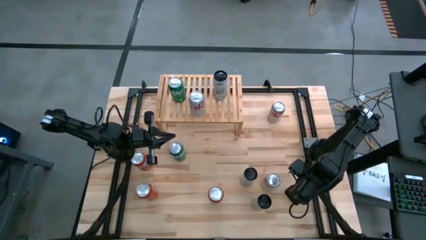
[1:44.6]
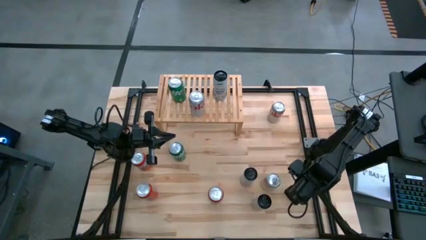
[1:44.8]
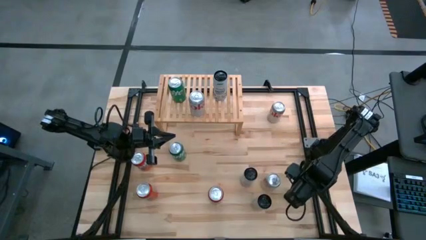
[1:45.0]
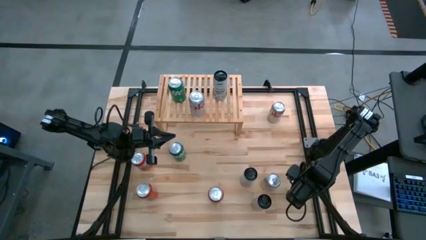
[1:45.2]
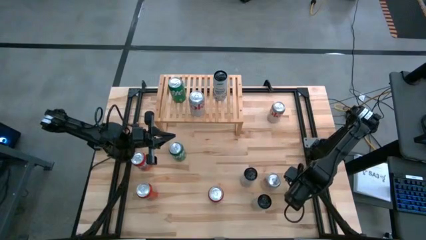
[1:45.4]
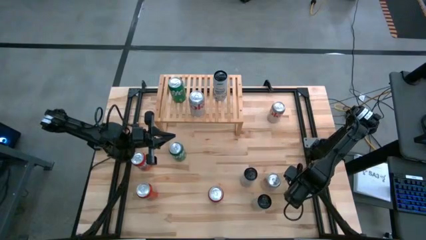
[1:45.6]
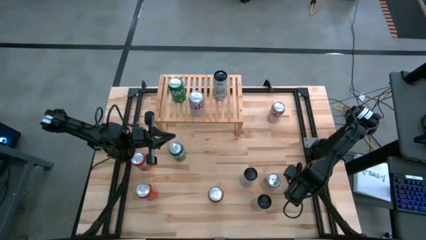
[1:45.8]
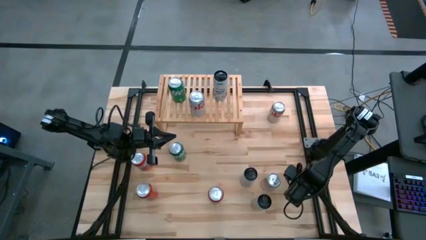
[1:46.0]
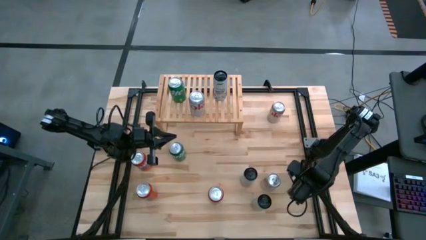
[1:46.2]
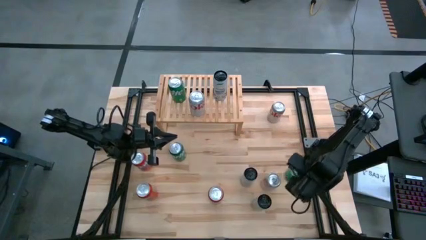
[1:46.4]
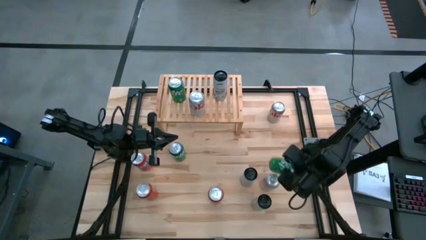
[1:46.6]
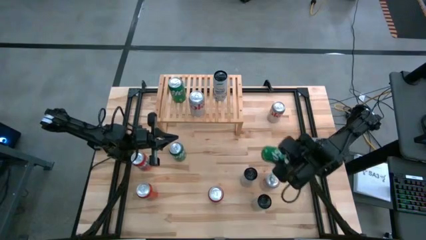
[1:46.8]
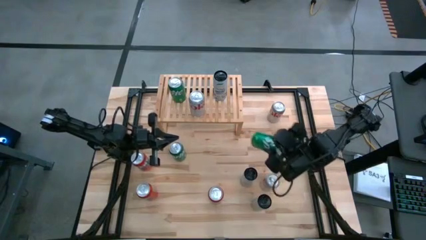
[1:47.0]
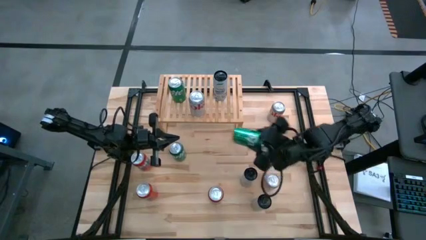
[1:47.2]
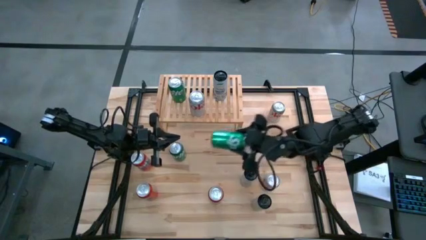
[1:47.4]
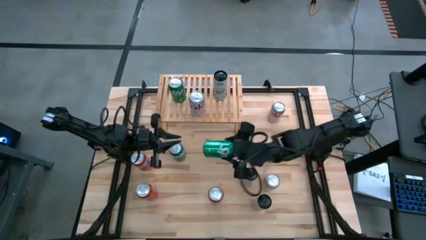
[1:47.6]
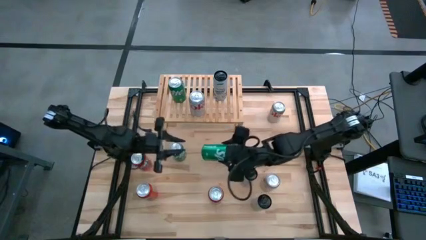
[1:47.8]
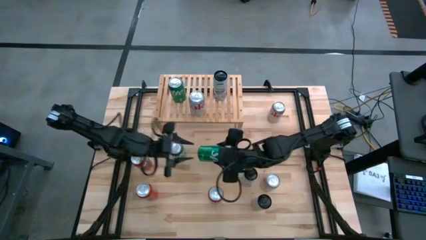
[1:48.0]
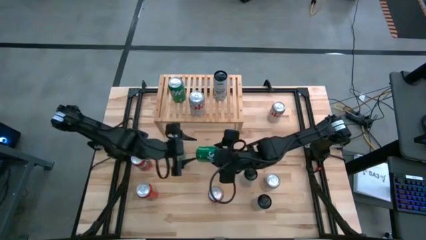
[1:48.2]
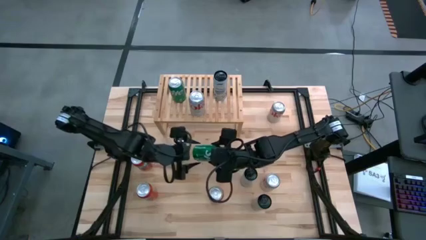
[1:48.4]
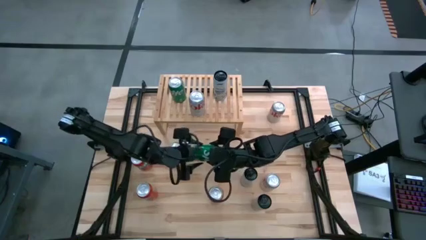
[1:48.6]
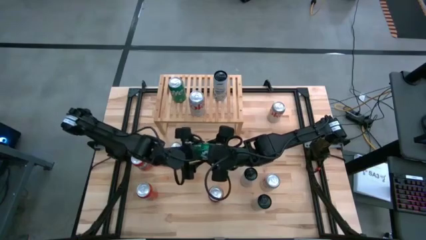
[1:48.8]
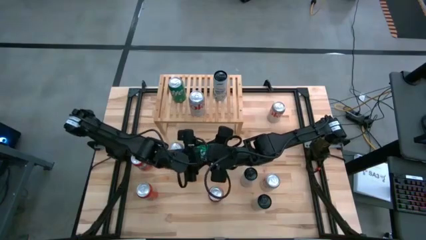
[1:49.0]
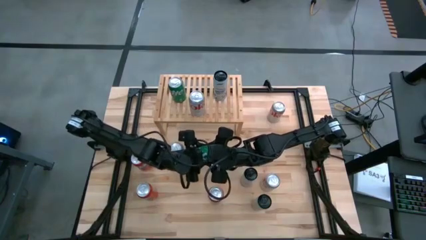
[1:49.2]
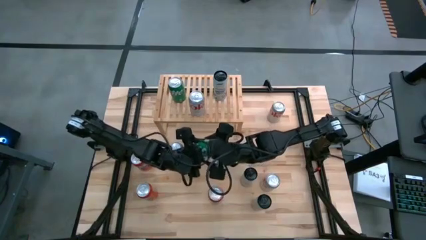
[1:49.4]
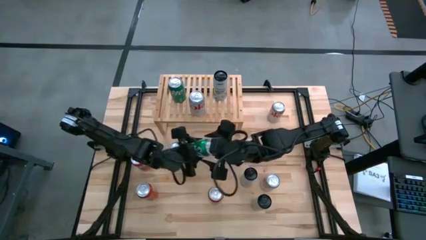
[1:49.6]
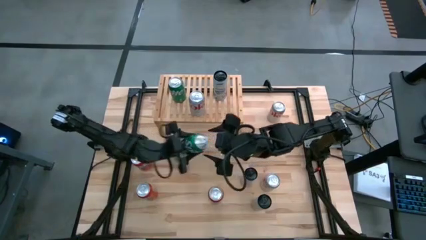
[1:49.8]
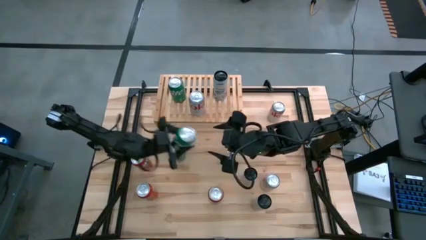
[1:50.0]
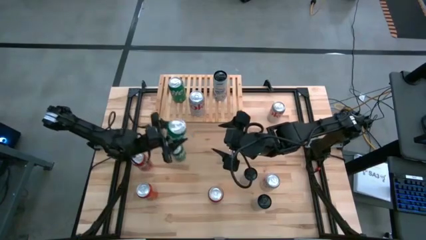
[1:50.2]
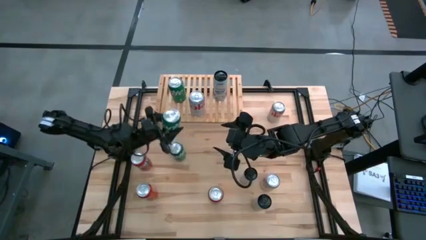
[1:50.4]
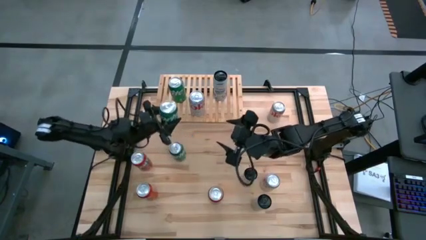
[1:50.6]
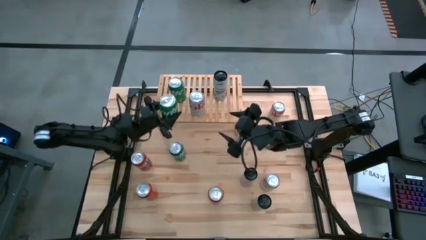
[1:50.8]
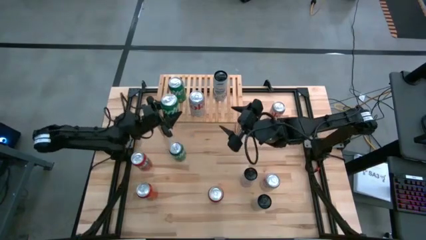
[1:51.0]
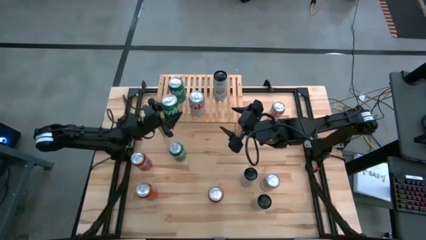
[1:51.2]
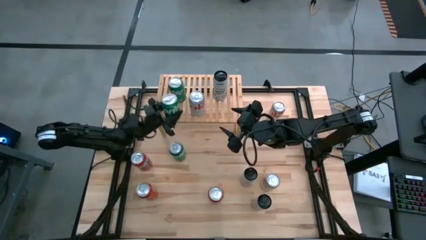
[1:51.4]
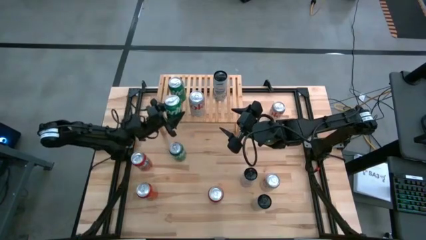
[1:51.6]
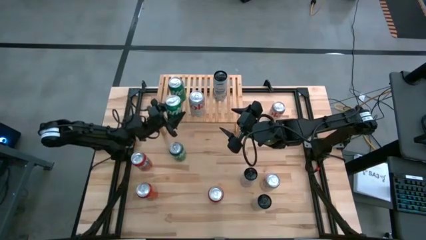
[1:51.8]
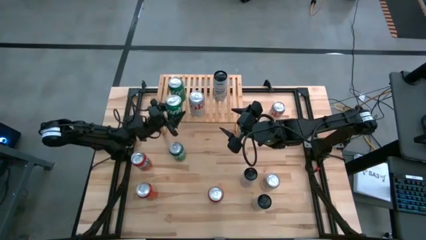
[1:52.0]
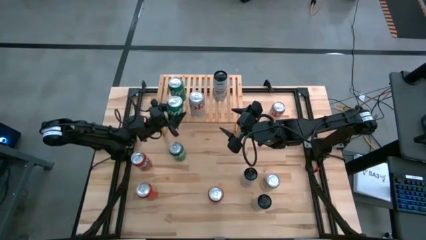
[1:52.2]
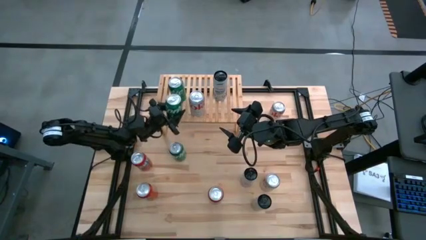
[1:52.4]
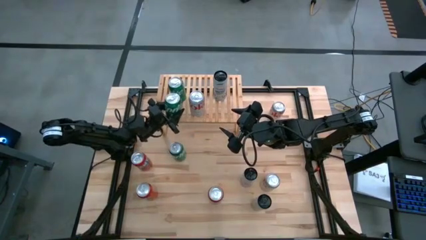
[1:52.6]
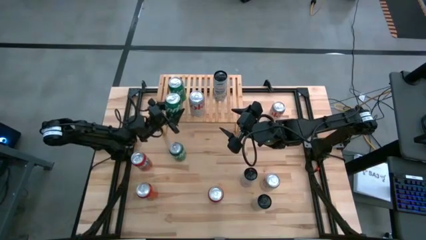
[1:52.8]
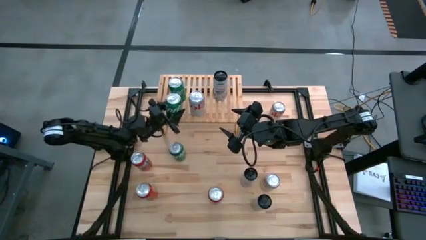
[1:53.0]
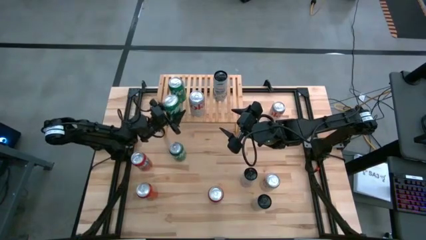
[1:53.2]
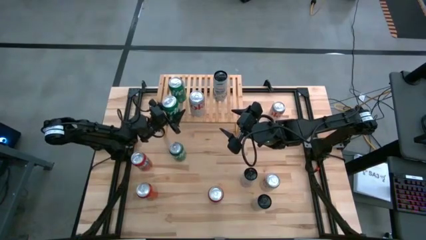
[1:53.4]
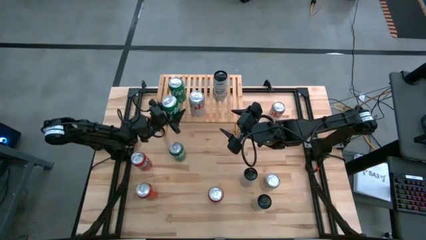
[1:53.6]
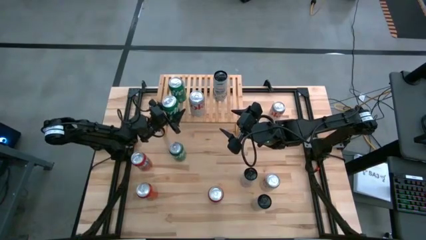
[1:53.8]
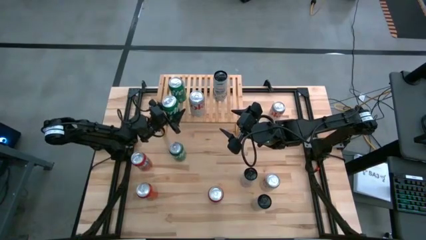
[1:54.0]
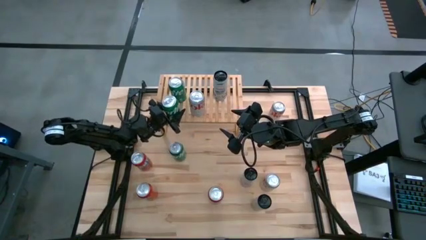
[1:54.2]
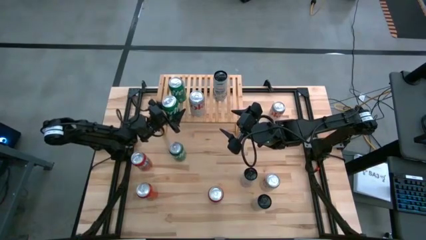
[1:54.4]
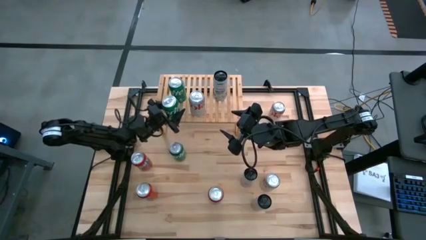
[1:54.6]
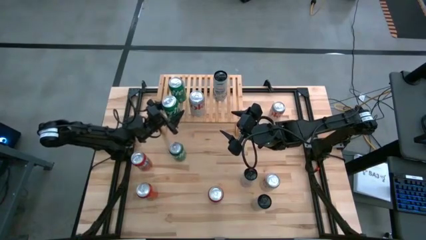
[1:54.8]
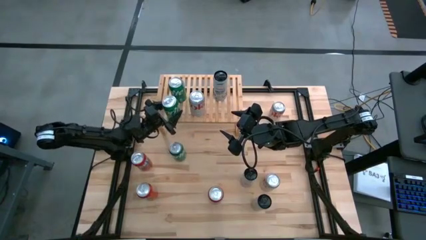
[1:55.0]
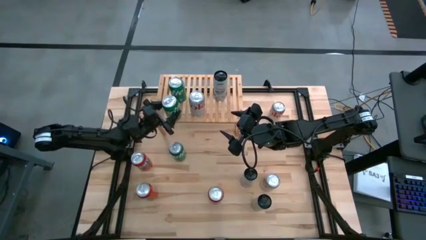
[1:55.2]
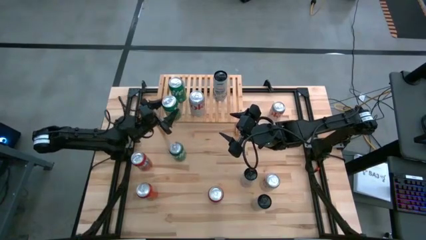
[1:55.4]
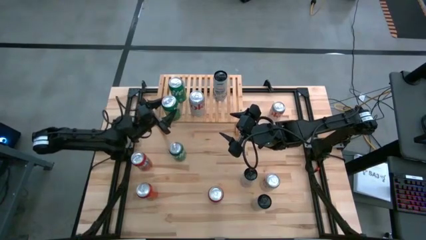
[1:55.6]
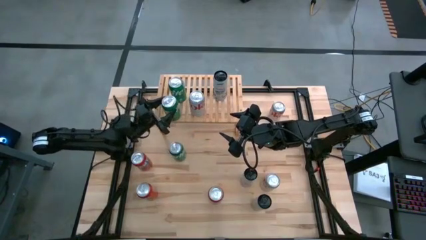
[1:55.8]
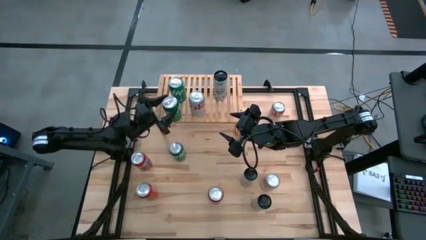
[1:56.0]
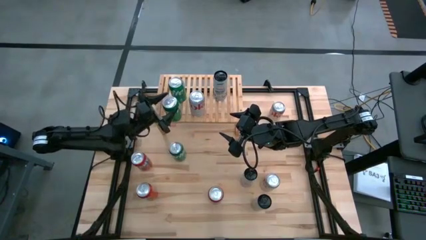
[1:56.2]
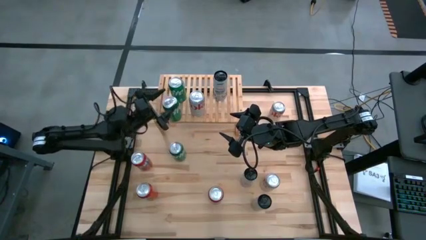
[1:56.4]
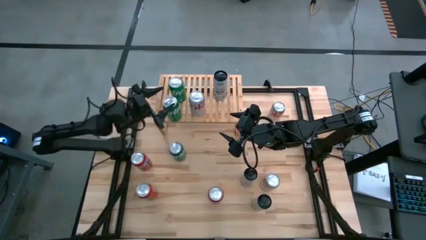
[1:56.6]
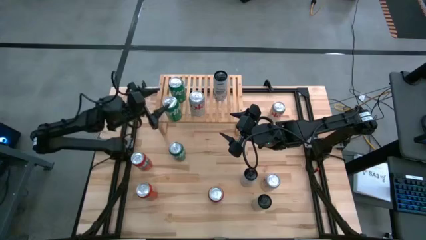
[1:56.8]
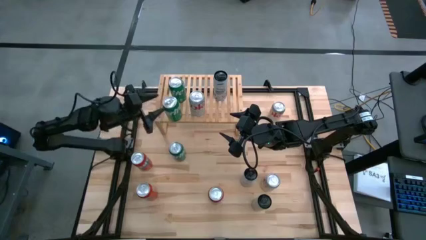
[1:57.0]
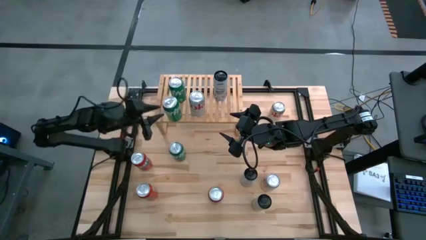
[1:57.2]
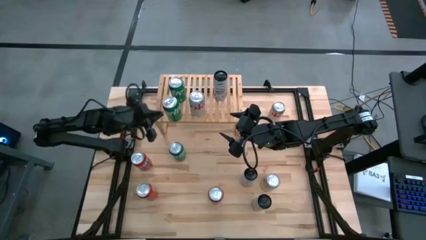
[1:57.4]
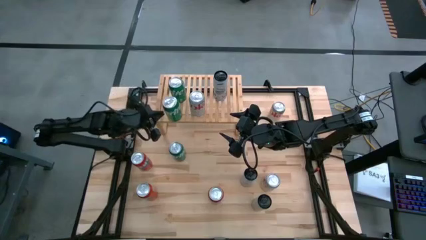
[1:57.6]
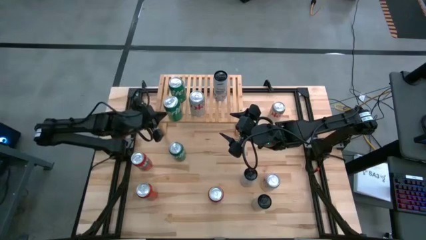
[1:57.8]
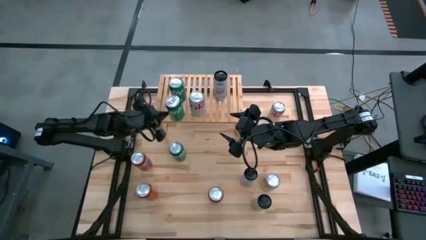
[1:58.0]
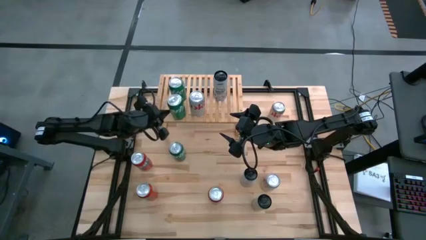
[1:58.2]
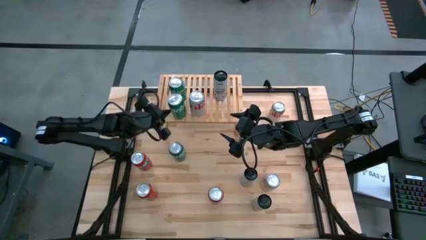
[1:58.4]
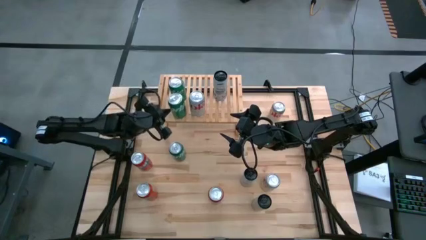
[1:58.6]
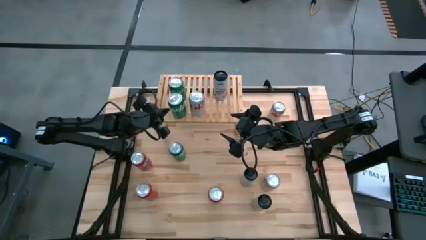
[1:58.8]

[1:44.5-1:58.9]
Task: Place canned beverage on shelf
Put the bottom green soda can on the shelf

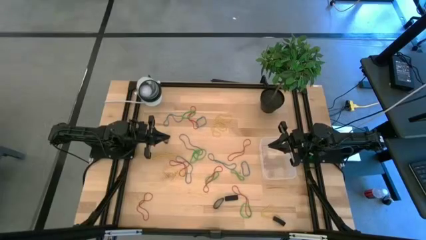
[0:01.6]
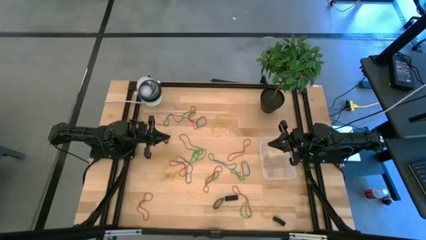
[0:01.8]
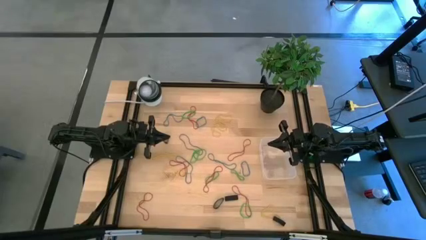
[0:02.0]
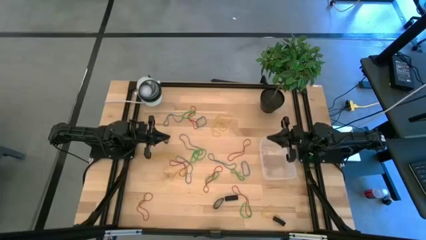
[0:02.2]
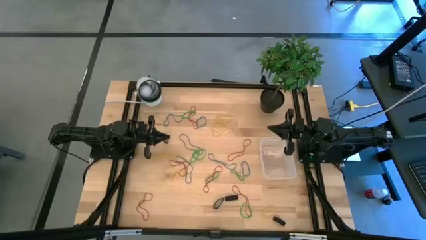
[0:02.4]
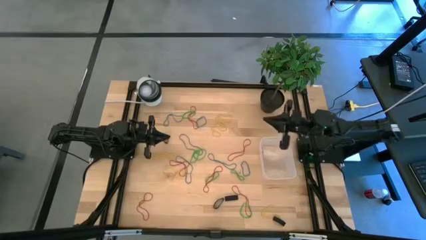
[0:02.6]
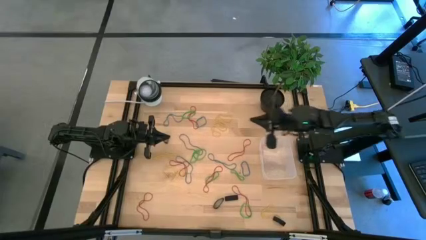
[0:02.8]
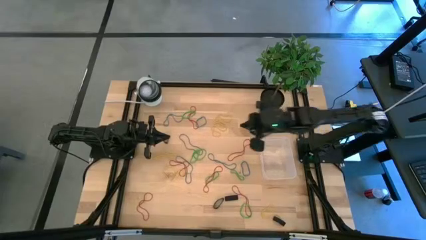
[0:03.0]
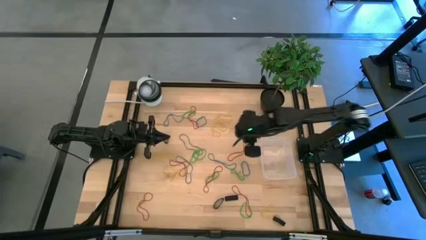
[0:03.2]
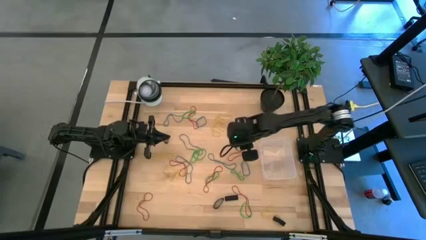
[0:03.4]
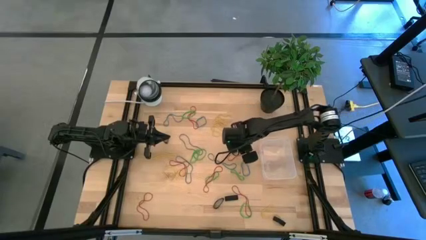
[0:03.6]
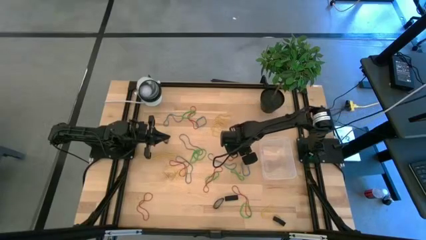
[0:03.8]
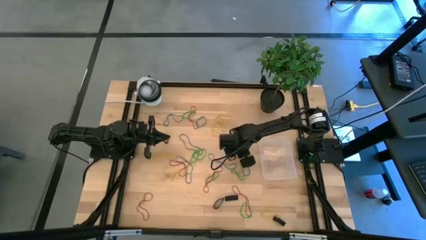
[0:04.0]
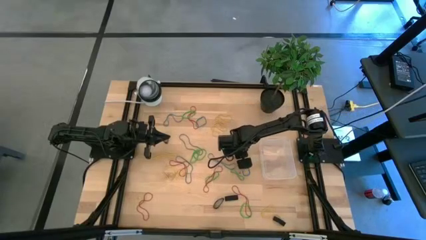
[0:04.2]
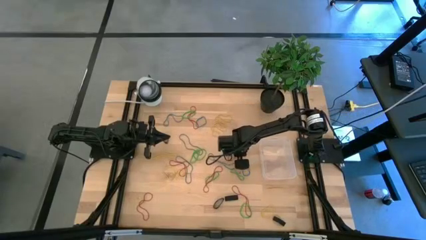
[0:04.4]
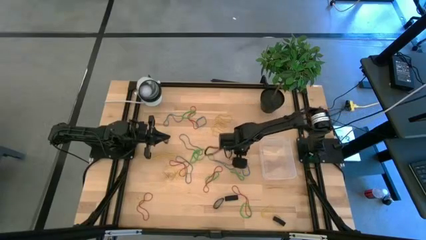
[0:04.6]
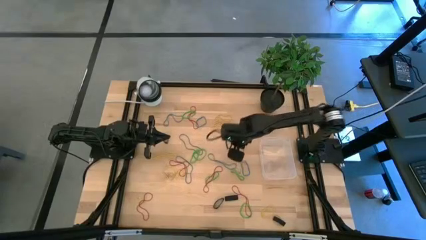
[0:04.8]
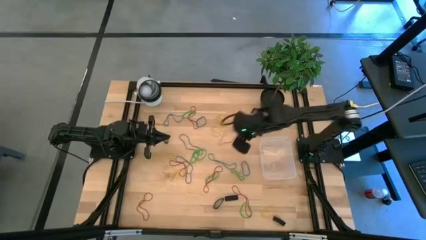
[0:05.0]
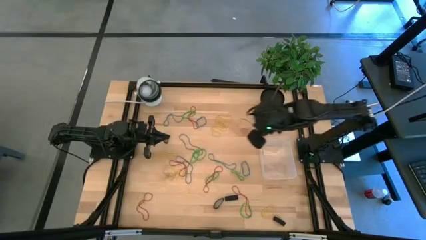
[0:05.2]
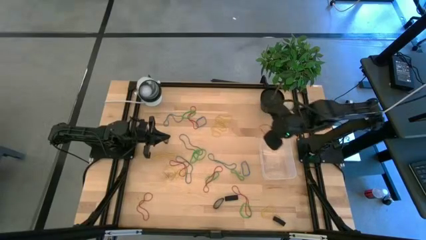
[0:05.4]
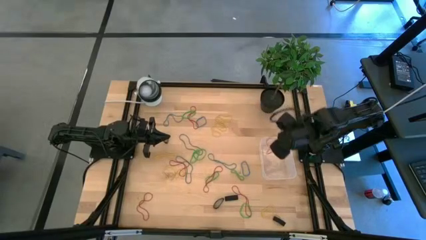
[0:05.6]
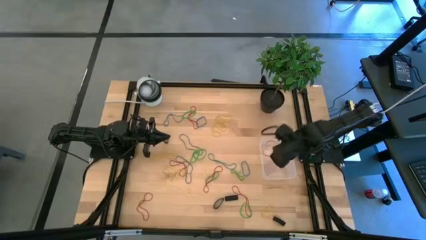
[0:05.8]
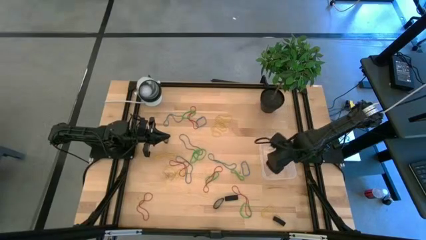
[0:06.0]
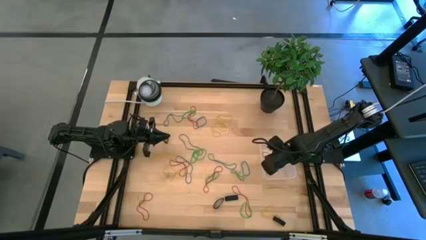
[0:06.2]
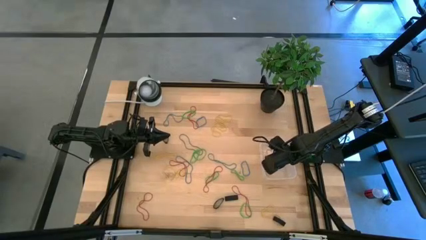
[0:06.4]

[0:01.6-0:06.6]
Task: Pick and place rubber bands into bin
Put the red rubber band into the transparent bin
